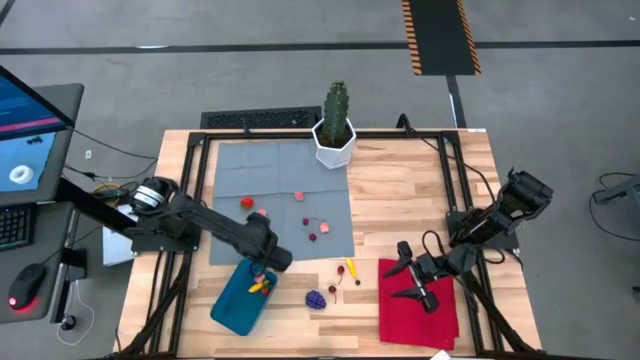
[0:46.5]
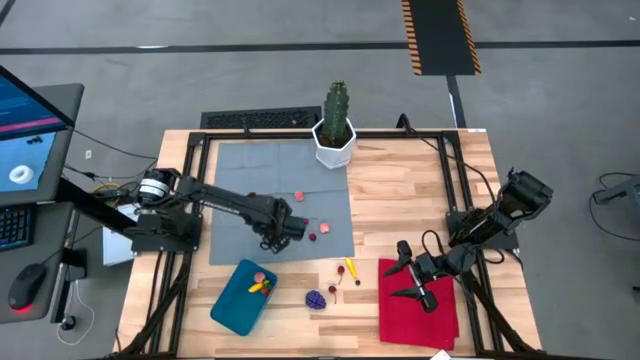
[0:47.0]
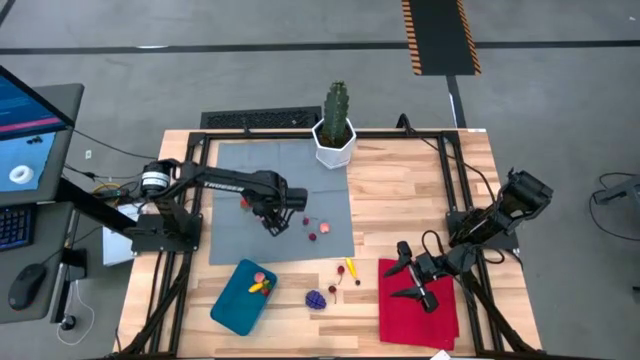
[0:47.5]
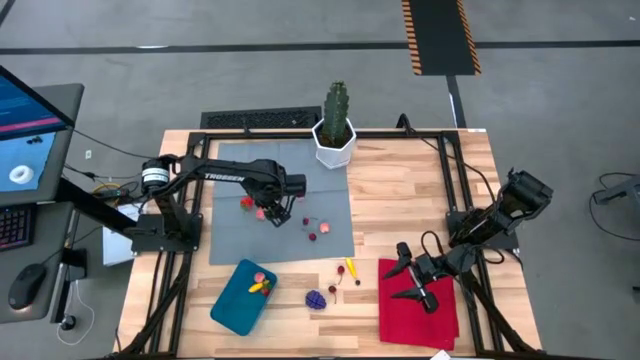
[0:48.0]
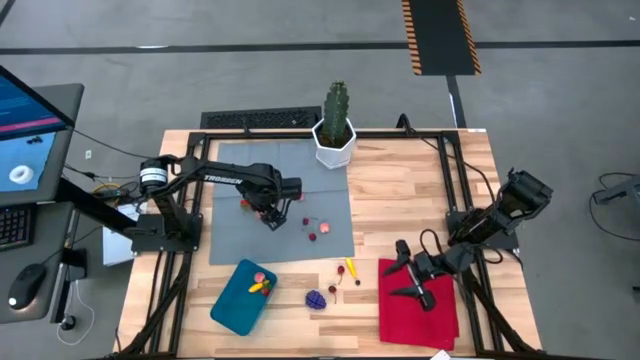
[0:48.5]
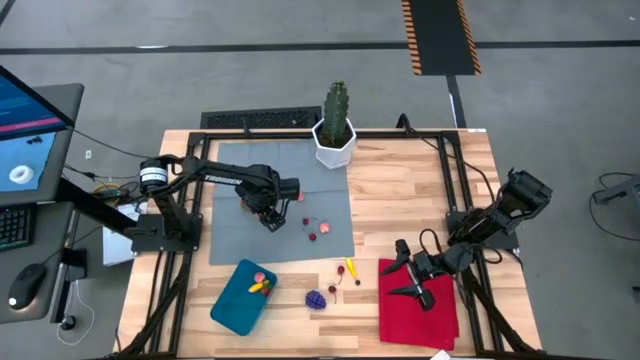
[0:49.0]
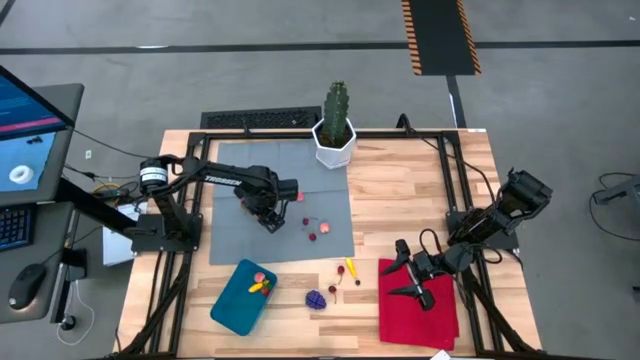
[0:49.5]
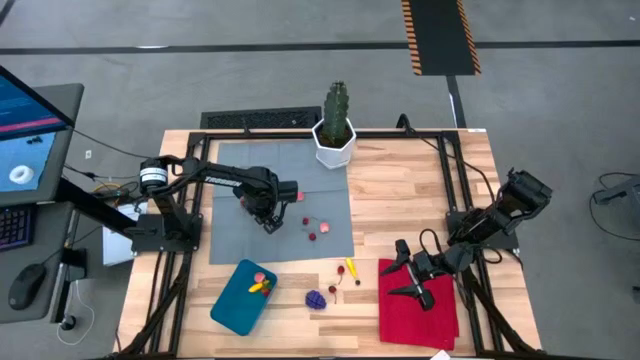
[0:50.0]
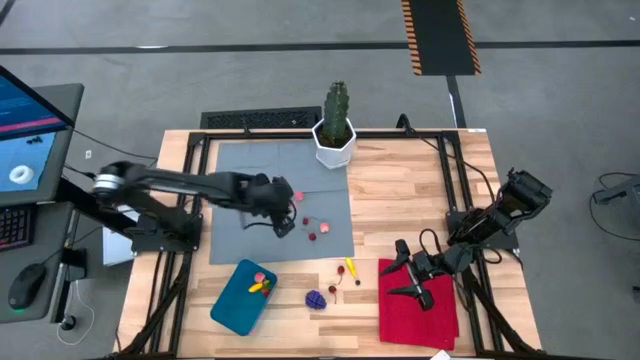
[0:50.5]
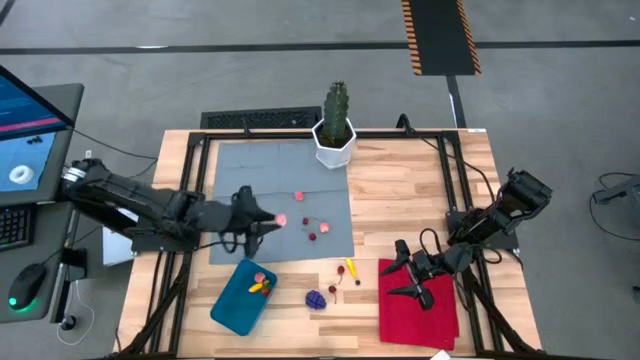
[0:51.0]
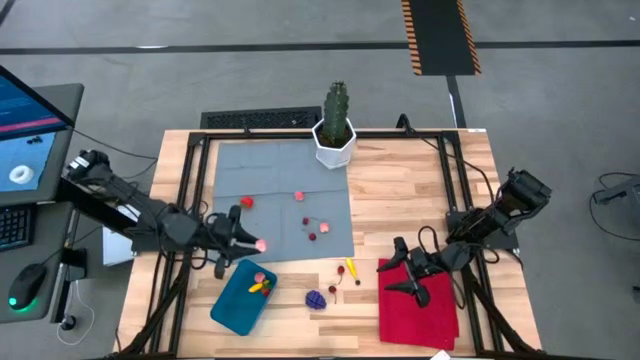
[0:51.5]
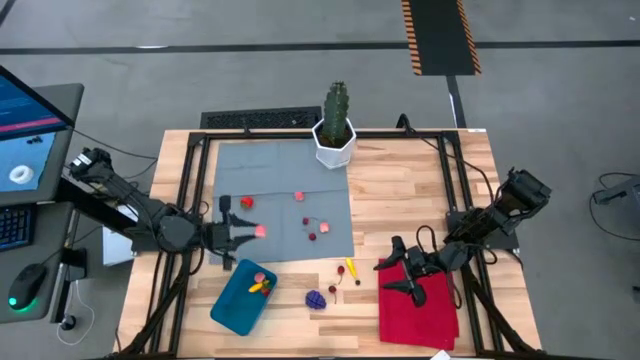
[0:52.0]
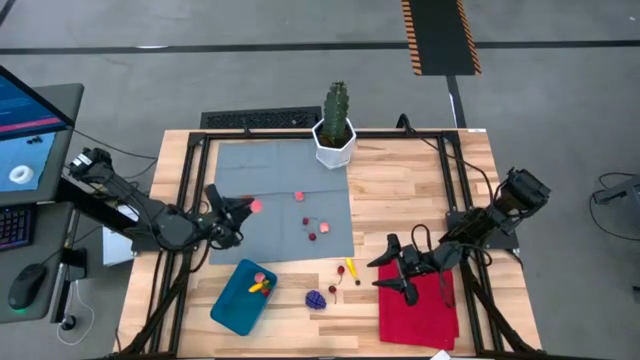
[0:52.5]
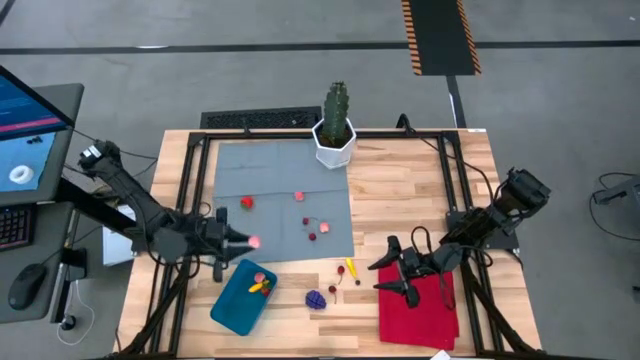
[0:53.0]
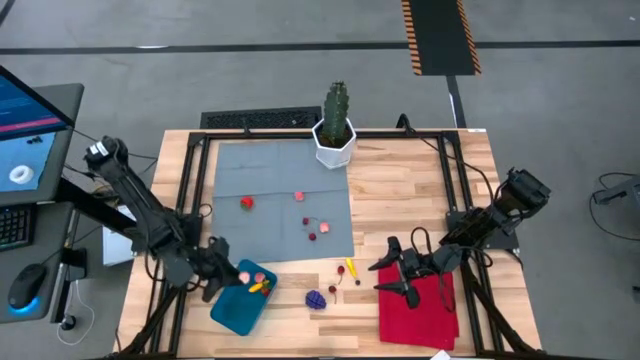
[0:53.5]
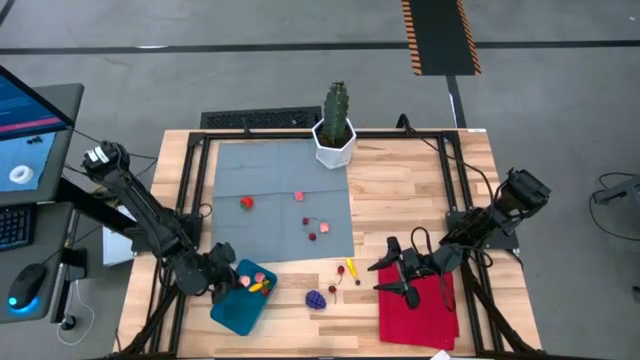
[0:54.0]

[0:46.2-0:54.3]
Task: Pick and placing Produce into tupperware
Put the peach into the blue bin

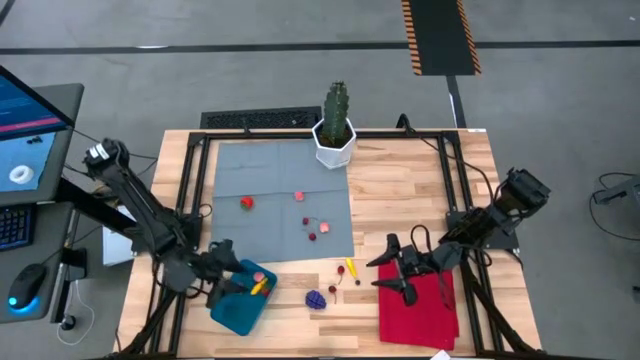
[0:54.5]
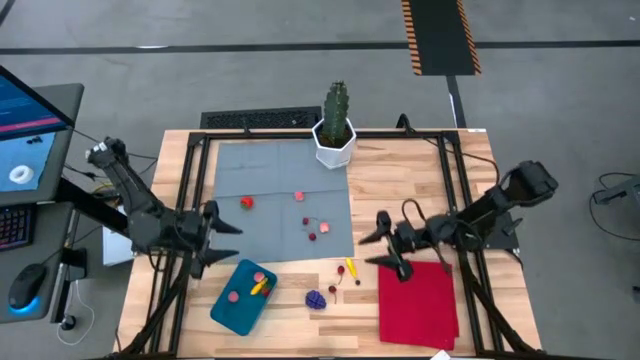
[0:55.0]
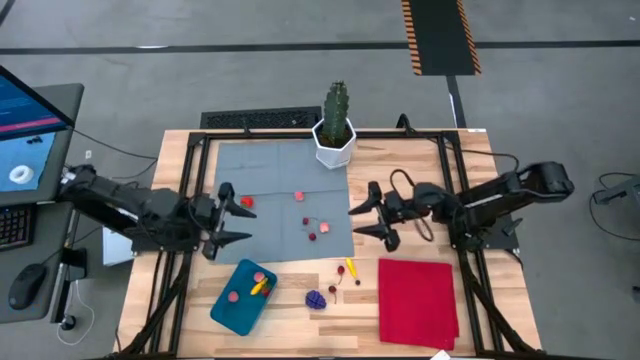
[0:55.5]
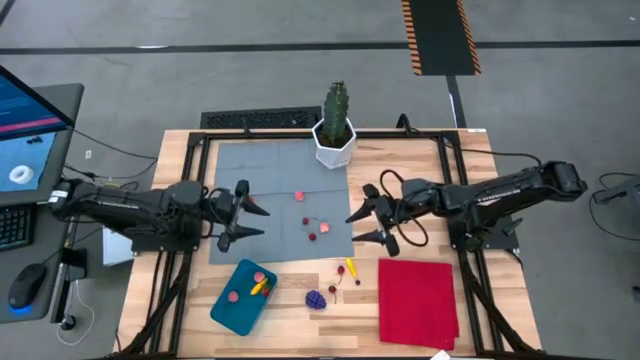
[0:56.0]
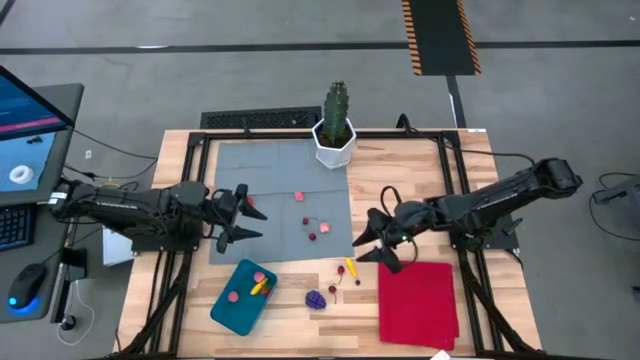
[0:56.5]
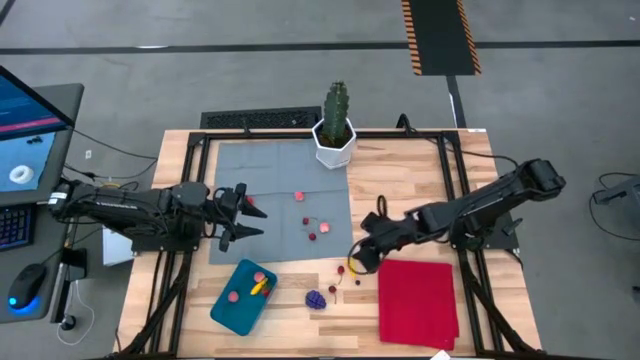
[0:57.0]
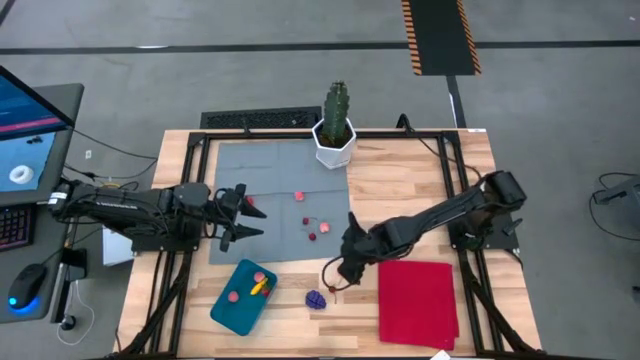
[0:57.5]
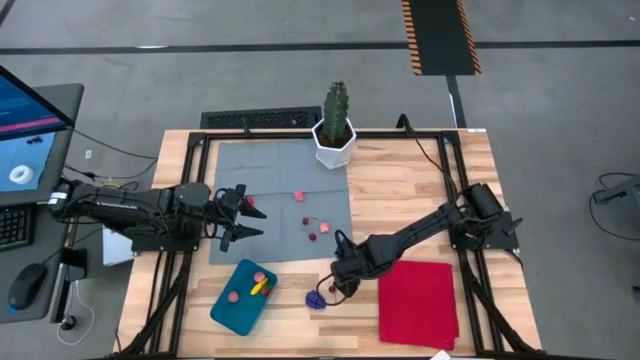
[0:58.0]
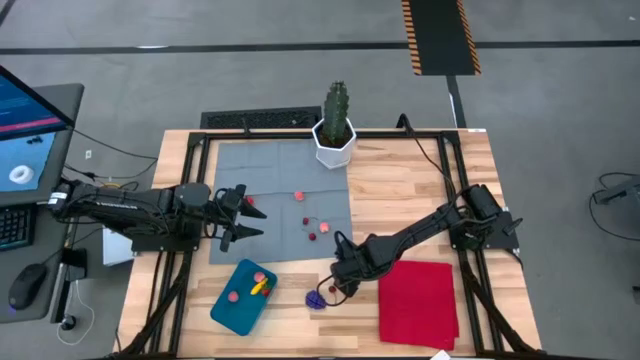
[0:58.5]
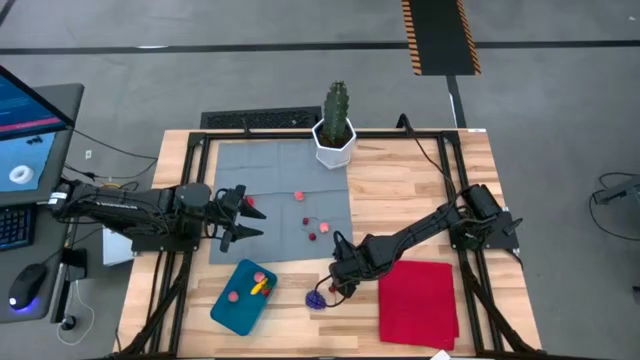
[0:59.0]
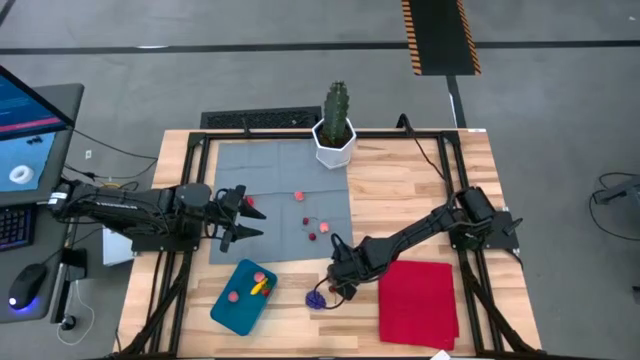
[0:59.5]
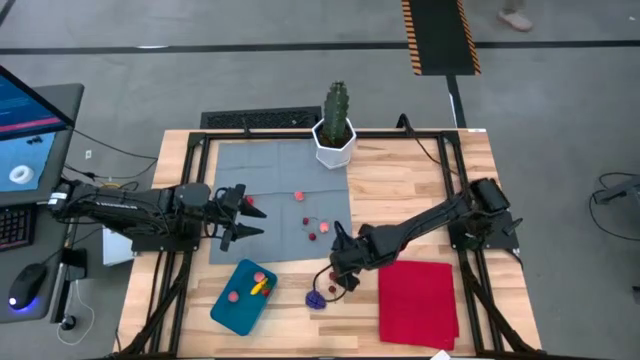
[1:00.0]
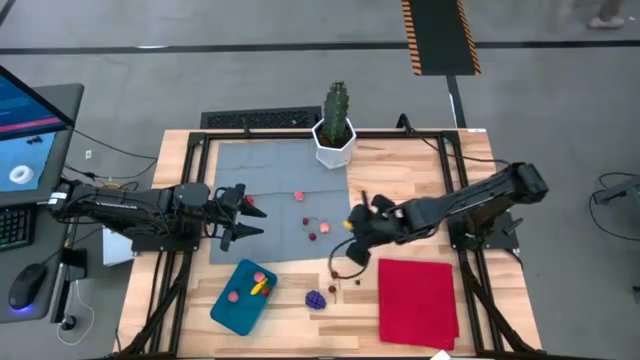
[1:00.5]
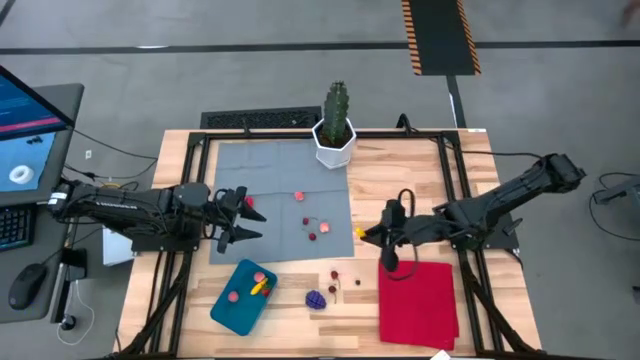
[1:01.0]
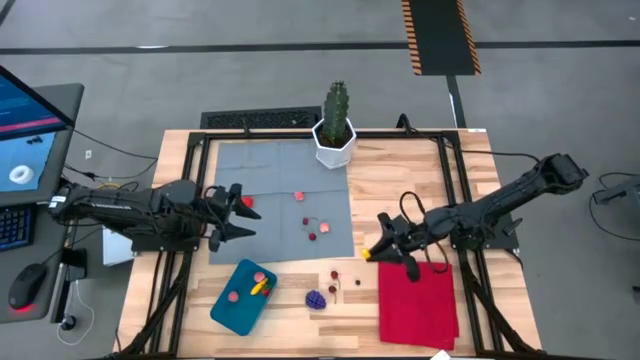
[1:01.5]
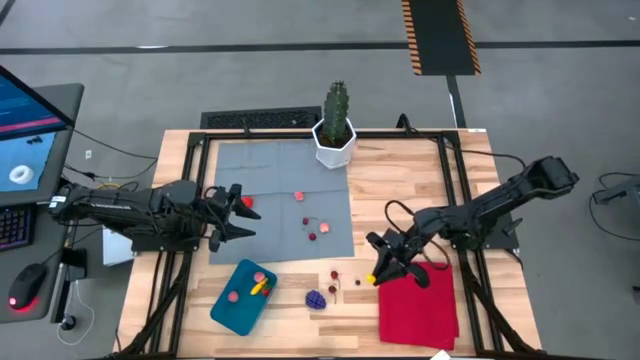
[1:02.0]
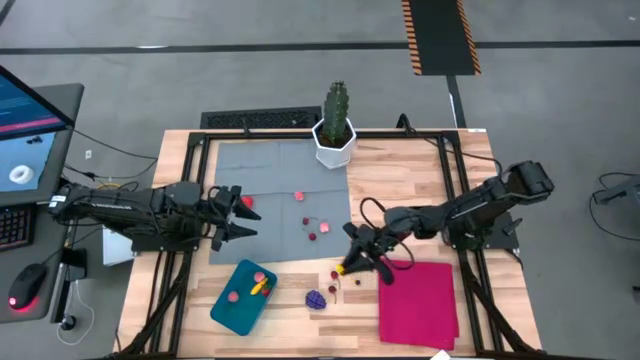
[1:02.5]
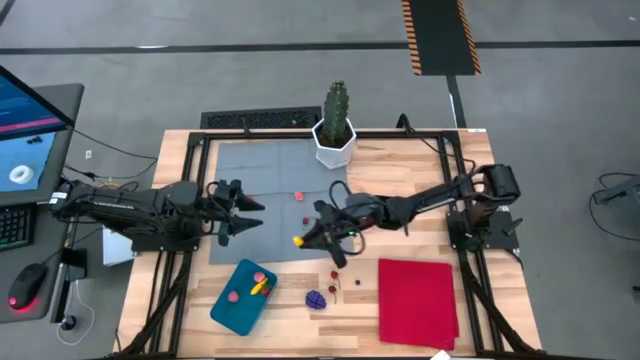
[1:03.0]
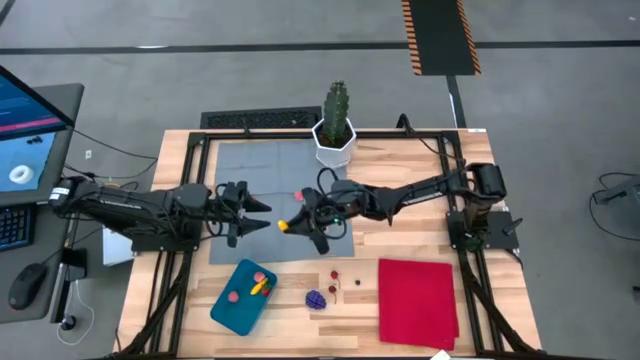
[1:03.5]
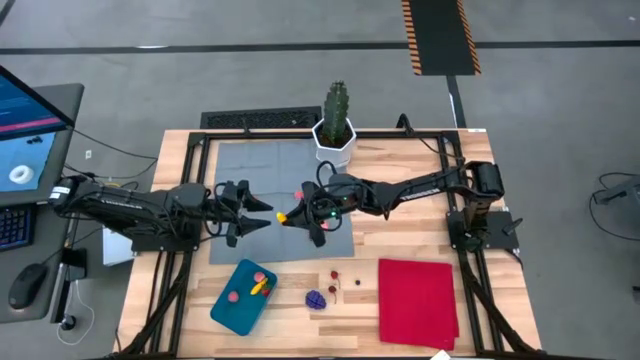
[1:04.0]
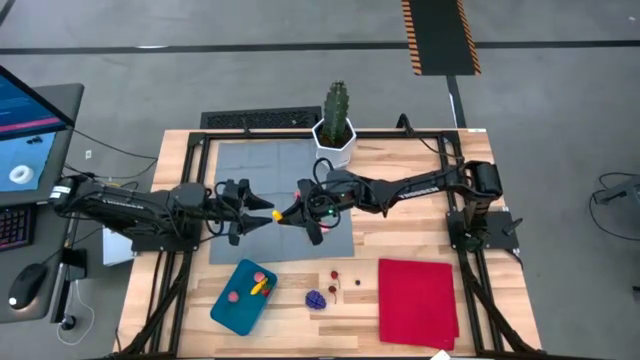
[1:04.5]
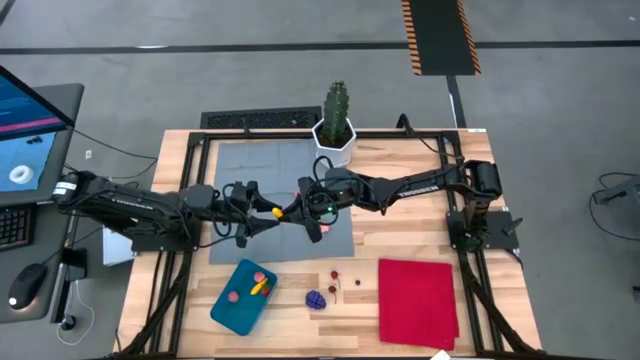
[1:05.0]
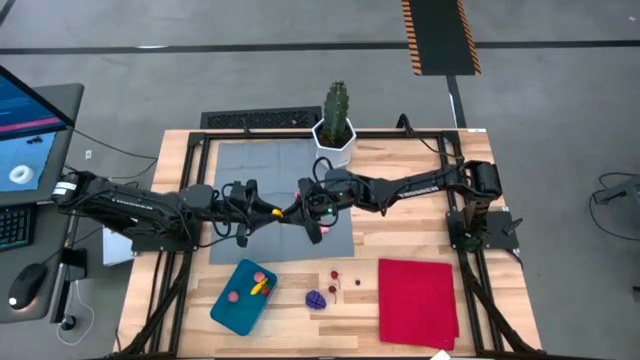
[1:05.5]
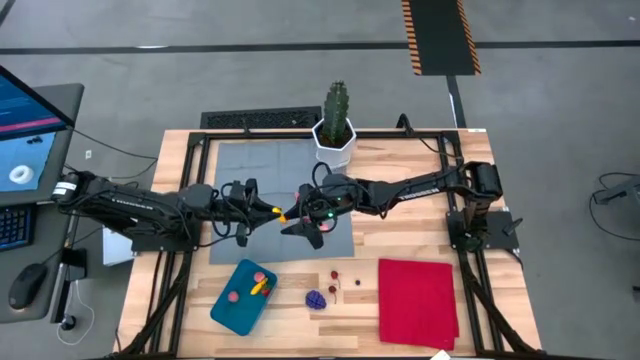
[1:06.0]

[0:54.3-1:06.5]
Put the corn into the blue bin

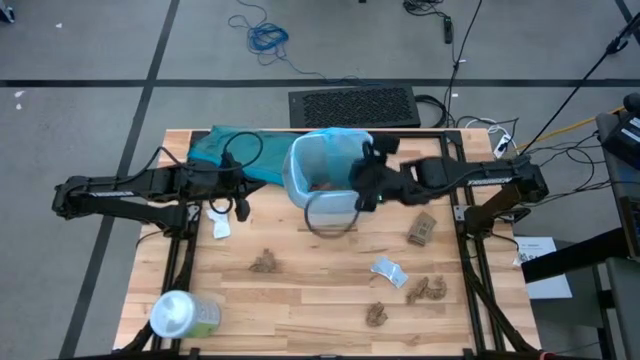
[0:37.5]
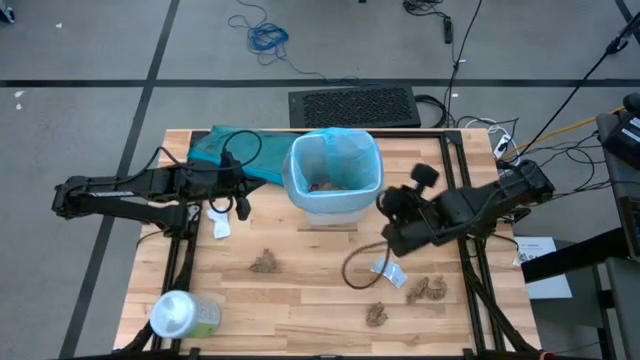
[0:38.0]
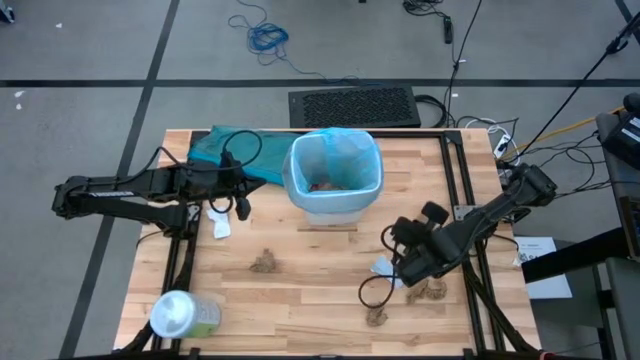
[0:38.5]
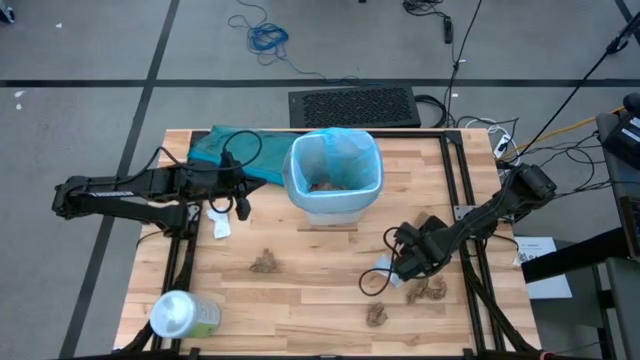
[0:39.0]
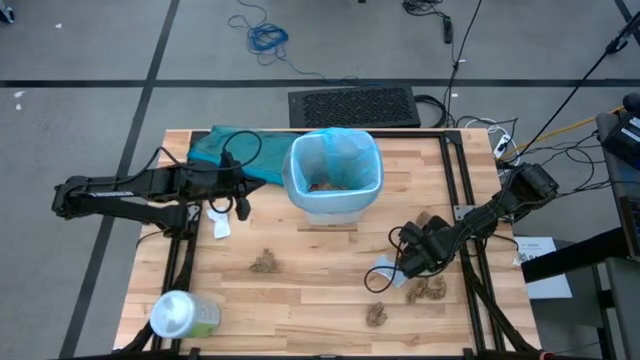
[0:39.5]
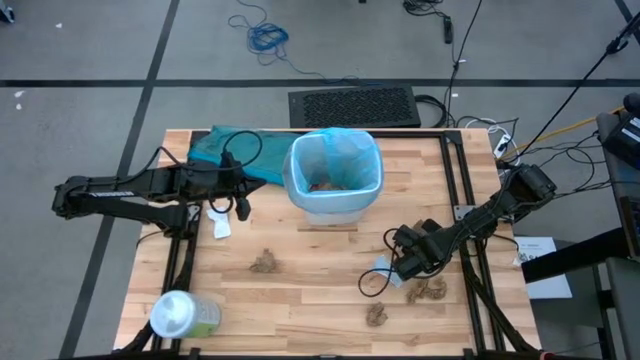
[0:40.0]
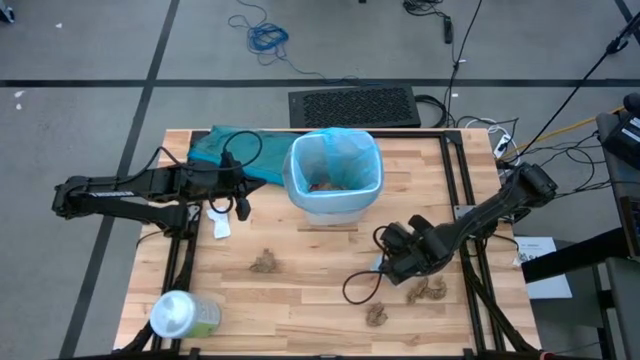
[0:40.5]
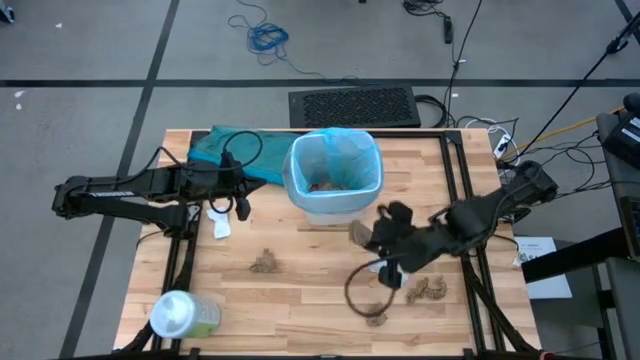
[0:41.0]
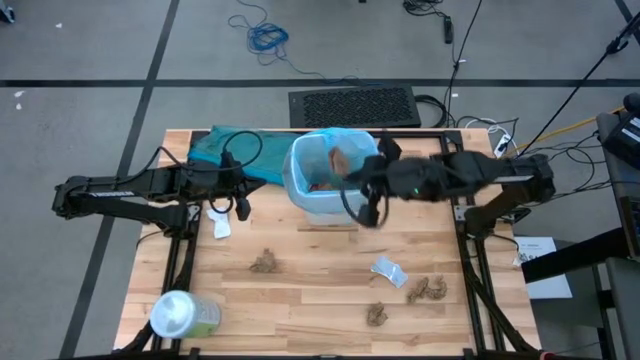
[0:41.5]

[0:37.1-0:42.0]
Task: place trash/remove bag and relplace
Put the brown coffee sleeve into the trash bin
